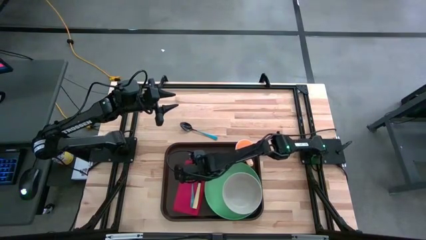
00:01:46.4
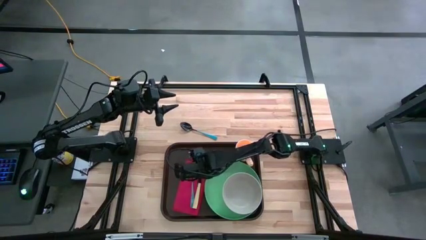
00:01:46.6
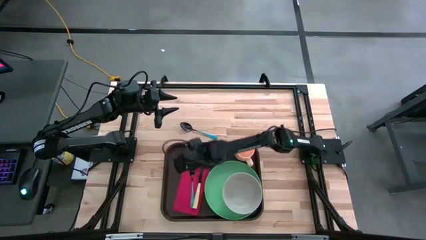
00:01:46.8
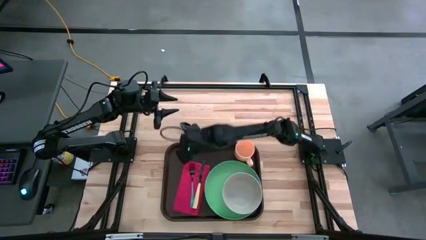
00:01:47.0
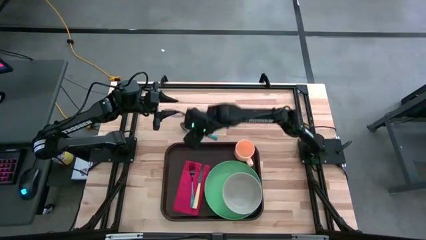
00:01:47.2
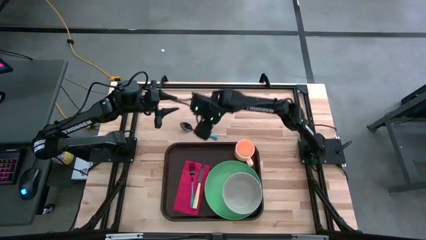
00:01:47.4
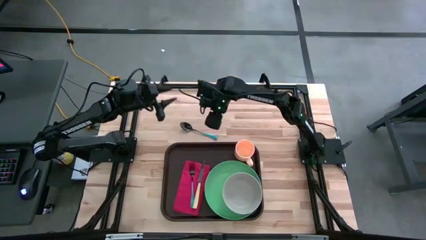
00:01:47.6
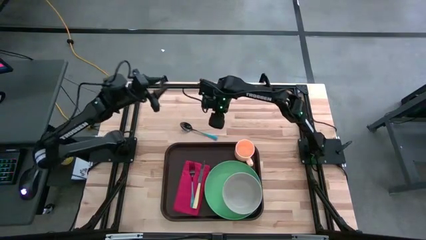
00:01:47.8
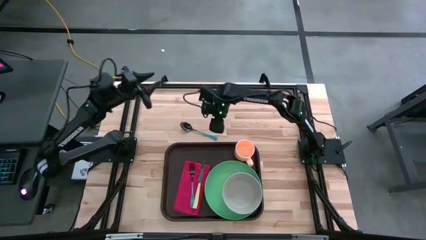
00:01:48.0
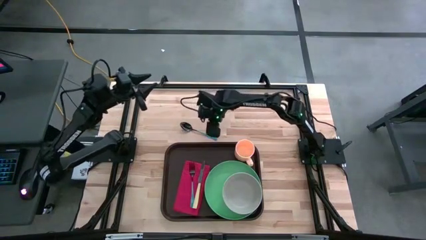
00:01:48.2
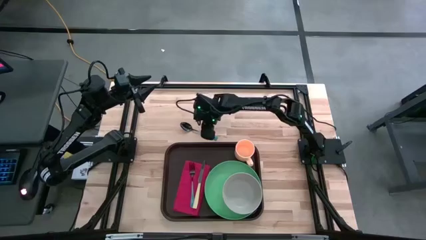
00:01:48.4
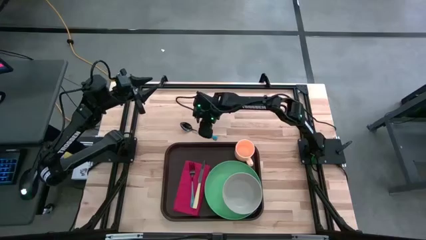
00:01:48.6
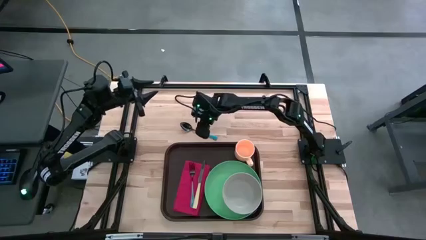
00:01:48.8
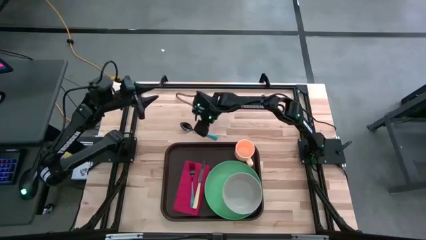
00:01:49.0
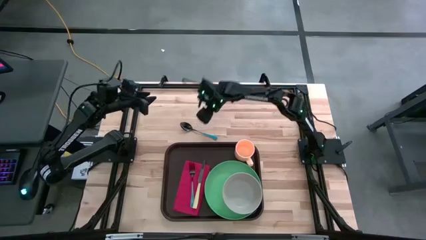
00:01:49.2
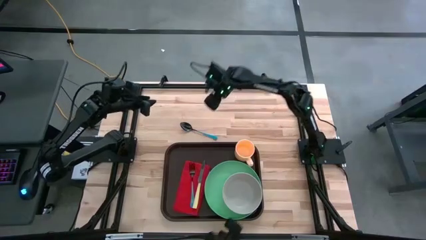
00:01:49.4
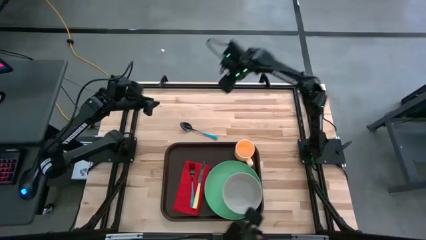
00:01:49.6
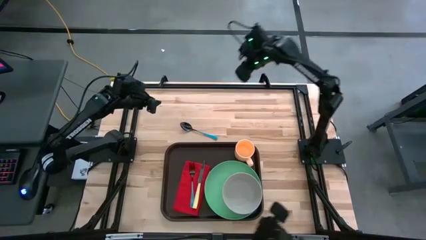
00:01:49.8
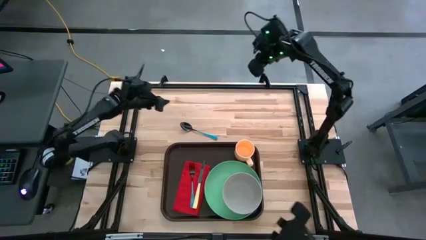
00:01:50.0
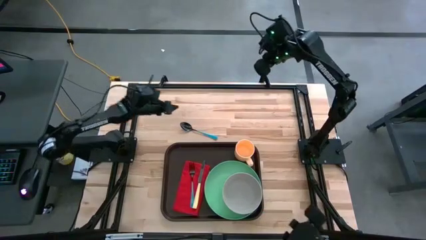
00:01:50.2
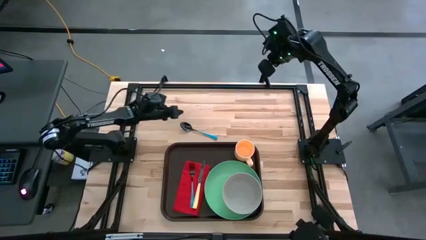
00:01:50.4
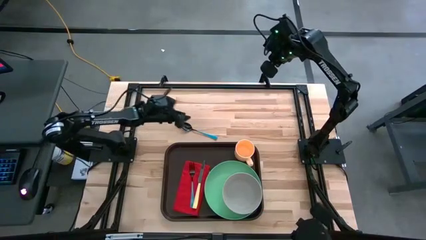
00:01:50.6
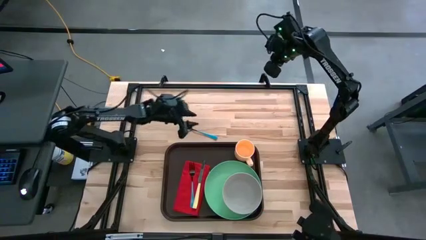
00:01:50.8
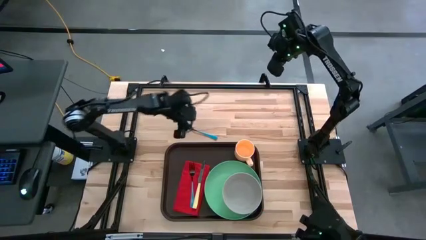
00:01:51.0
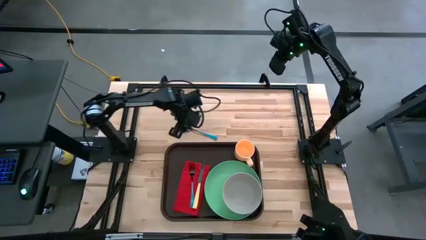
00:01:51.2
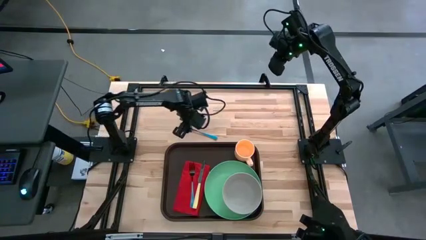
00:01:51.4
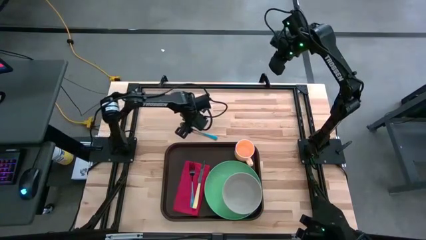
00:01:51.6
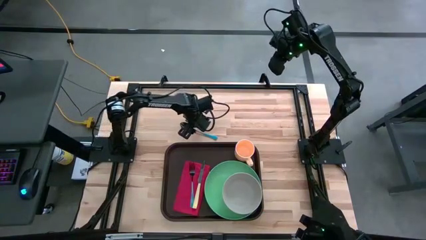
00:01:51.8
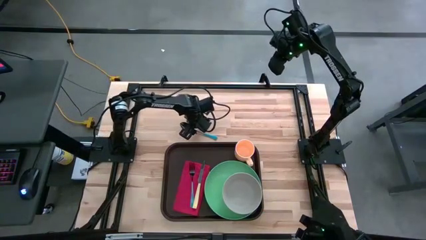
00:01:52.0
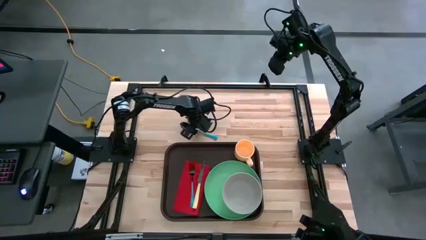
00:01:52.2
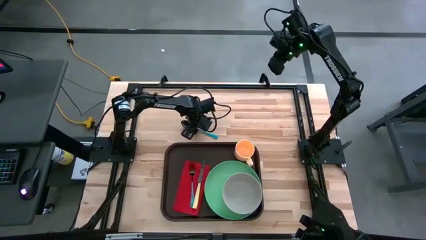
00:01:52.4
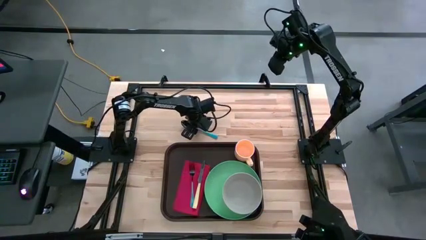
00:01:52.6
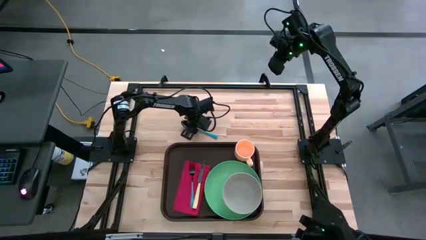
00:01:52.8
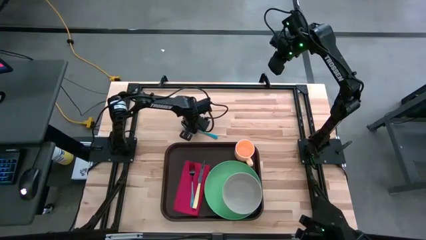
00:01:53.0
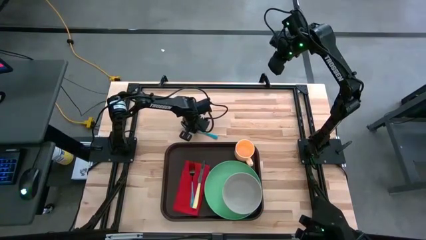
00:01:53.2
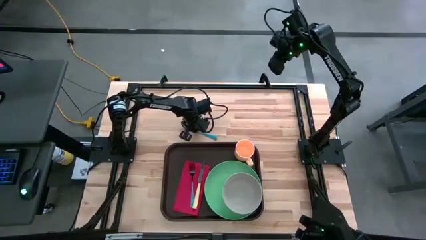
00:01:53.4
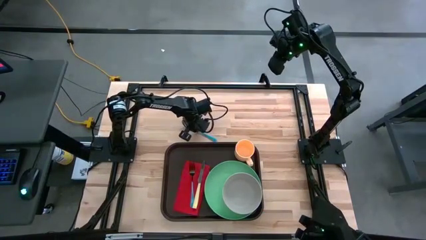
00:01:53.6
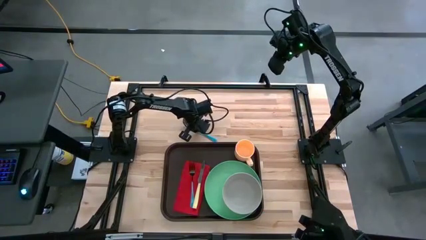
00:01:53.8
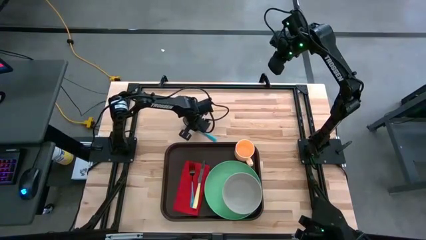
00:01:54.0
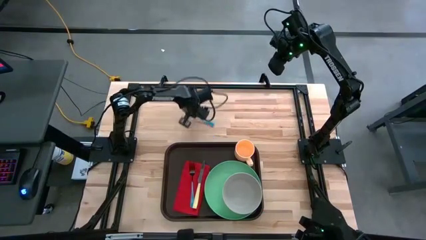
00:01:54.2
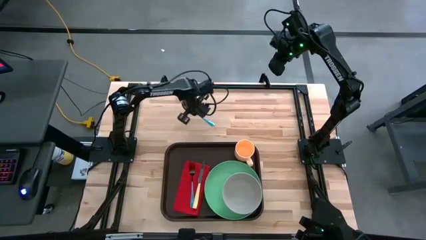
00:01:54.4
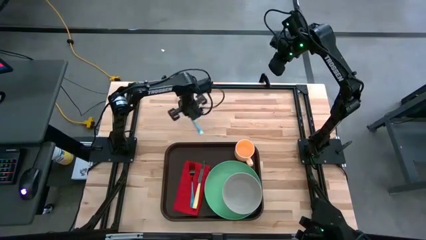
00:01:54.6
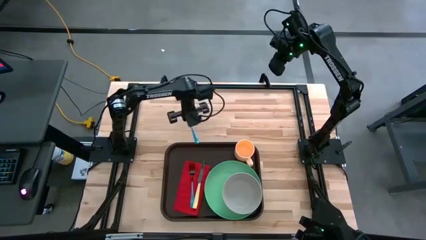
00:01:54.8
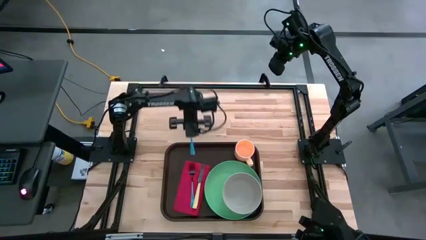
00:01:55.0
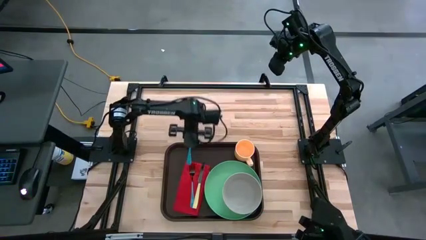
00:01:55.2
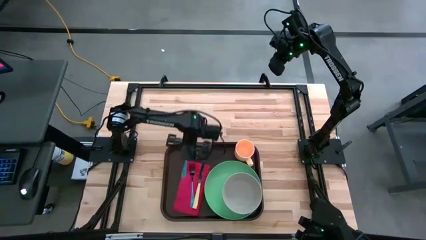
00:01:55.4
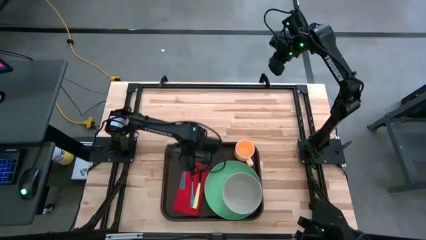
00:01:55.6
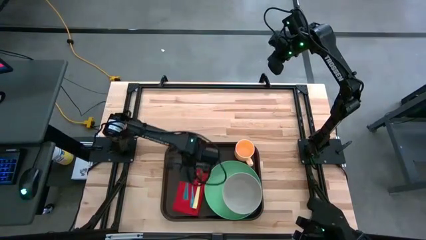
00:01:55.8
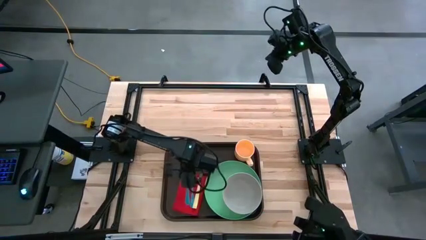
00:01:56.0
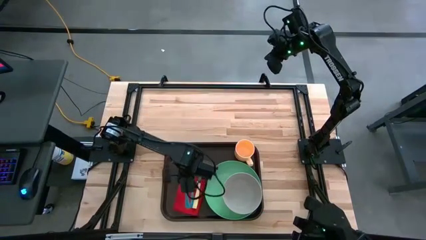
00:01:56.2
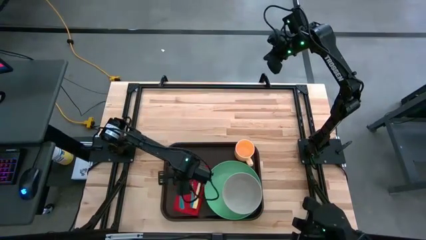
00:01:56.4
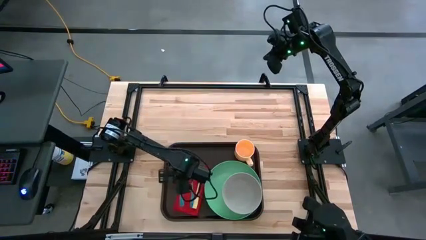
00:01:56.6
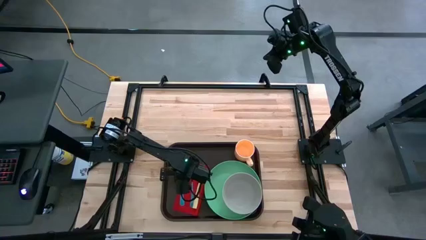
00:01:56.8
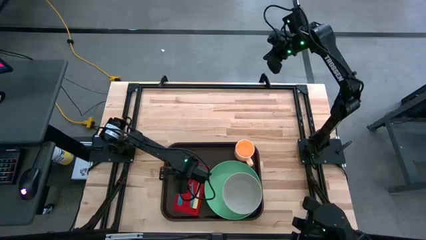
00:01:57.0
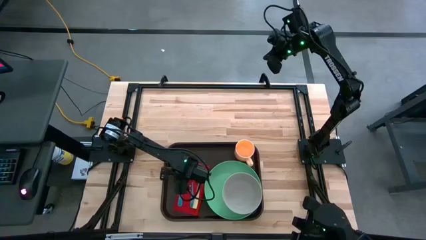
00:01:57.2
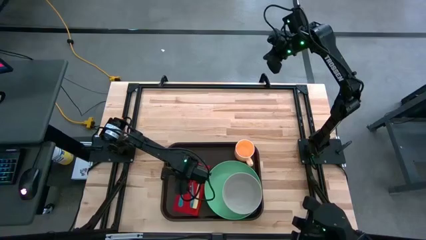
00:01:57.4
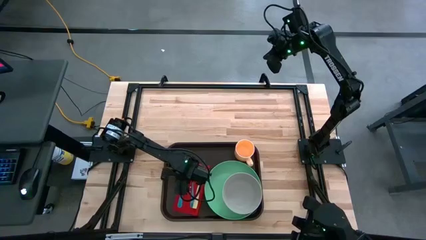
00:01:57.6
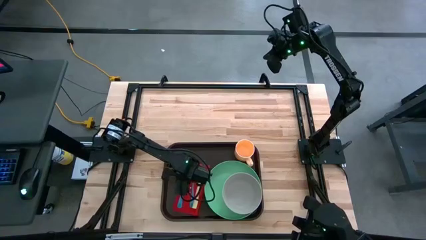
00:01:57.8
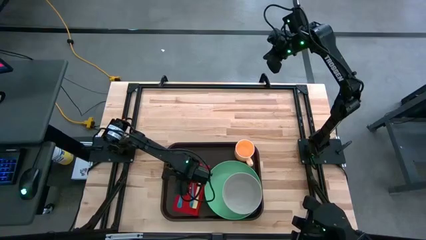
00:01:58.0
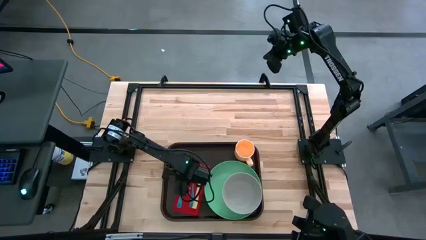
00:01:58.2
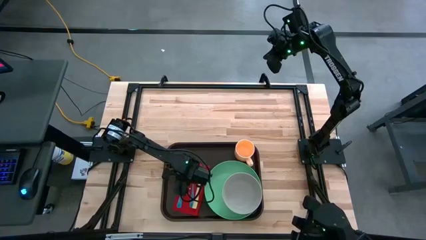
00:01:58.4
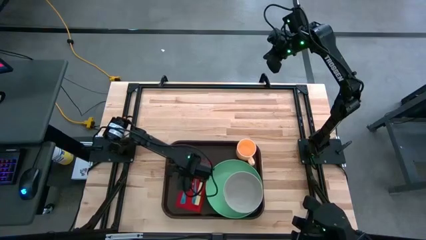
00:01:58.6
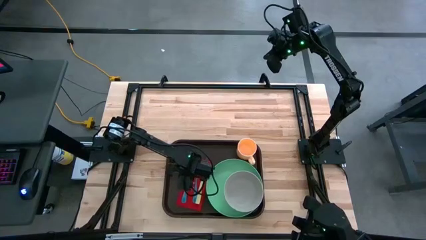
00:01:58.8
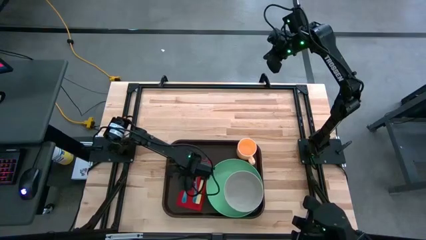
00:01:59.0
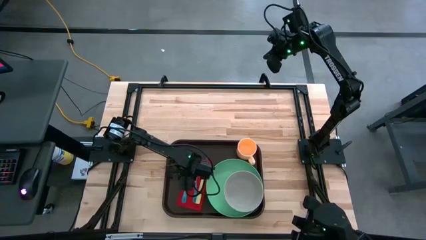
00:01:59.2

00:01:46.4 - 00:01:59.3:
Task: Set up tray
Put the blue spoon to the left of the blue fork on the red napkin on the brown serving tray

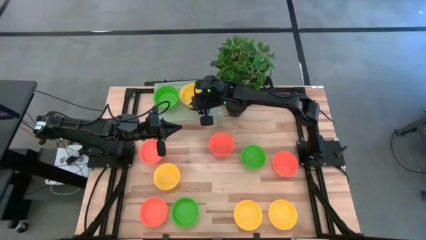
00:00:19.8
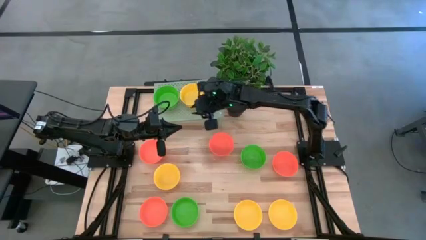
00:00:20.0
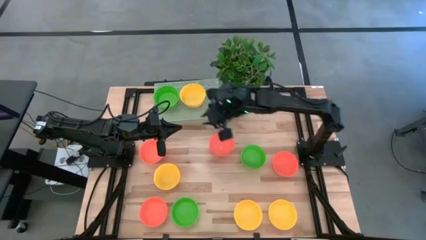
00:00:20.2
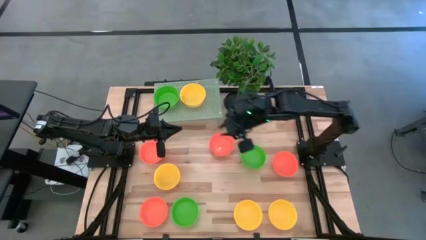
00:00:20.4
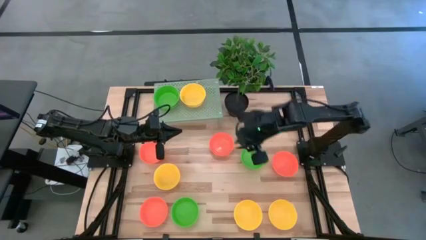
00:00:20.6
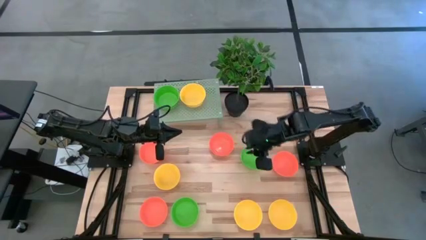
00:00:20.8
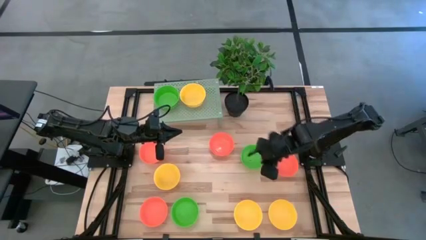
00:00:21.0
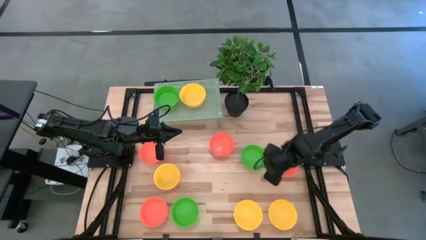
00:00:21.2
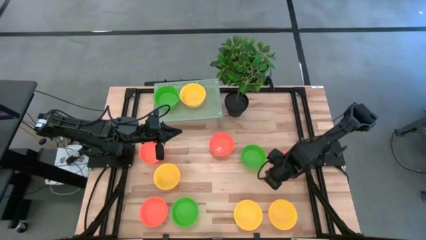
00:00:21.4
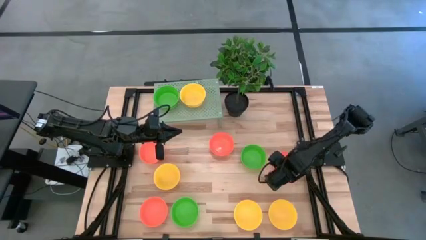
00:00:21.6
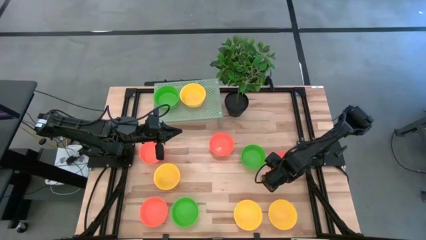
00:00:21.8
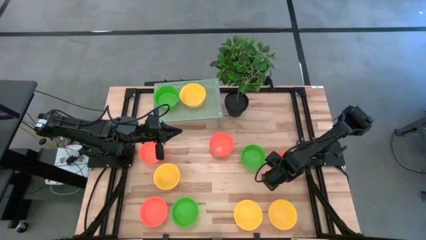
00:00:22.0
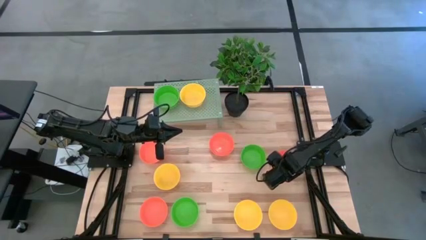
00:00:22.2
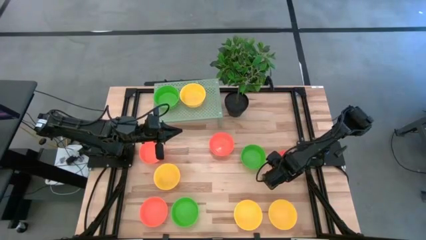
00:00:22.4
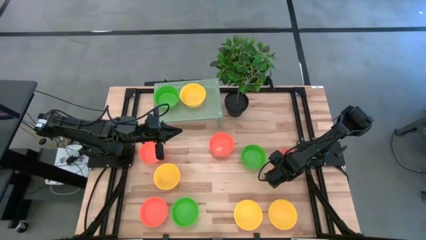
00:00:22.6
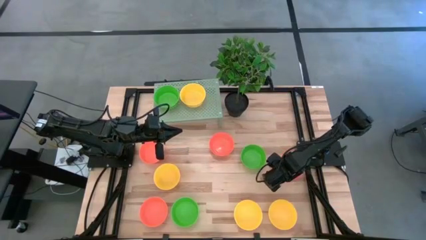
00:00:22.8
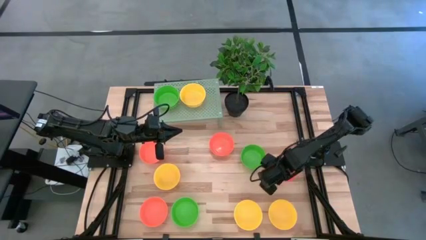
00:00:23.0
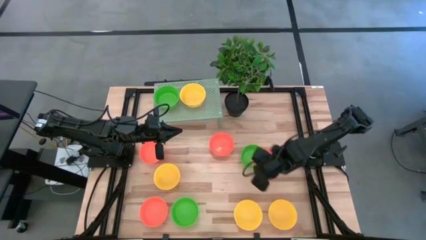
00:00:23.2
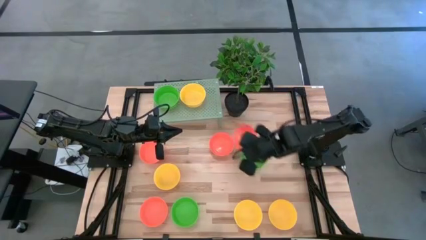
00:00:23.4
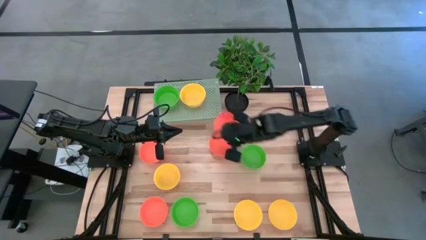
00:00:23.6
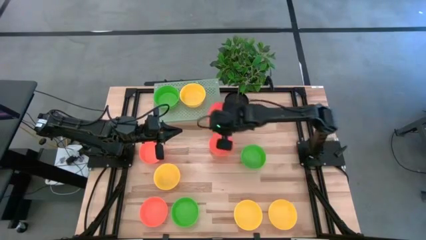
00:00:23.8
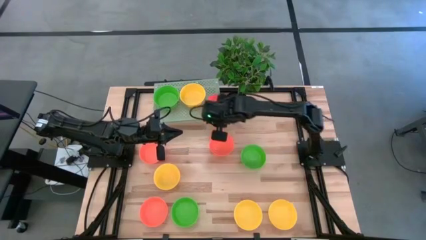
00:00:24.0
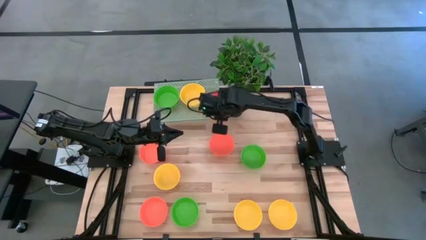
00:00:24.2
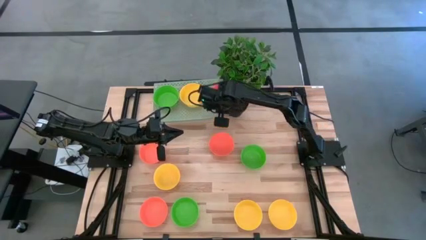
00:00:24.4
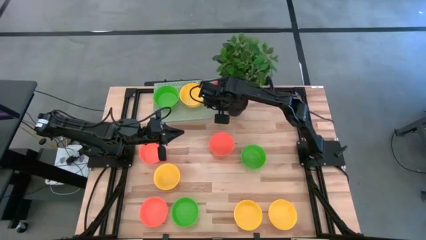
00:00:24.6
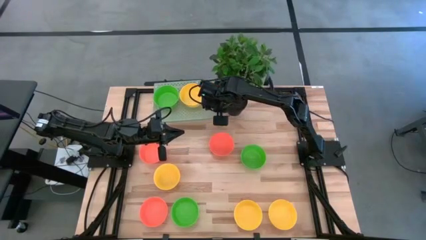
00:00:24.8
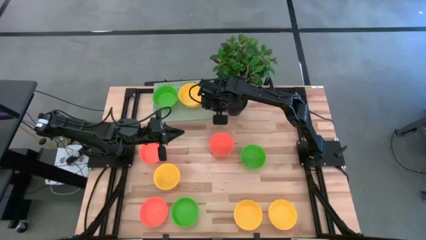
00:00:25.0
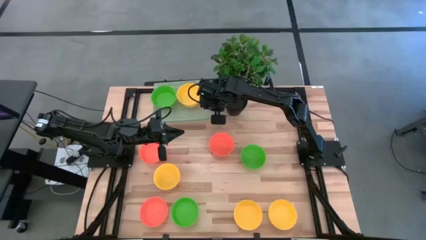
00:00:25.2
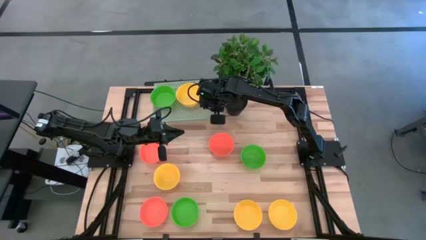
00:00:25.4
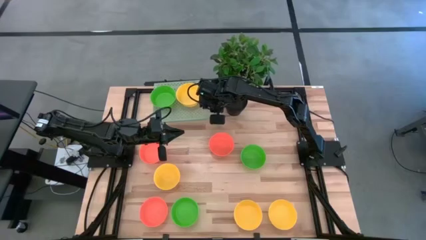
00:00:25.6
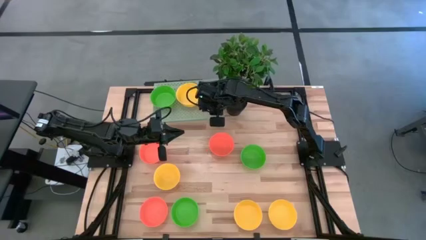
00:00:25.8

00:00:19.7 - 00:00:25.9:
Task: Pick & Place Mini bowls
Put the orange bowl on the shelf
